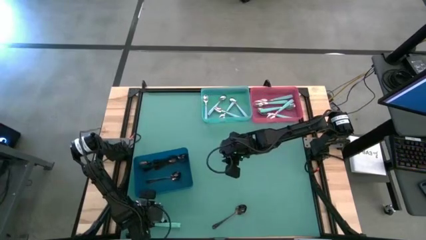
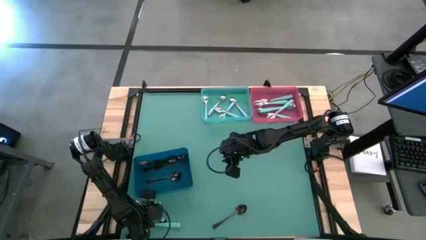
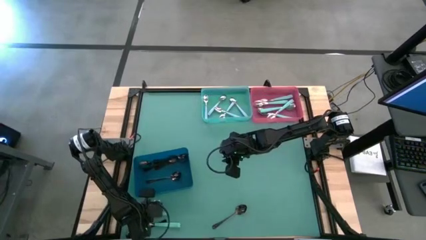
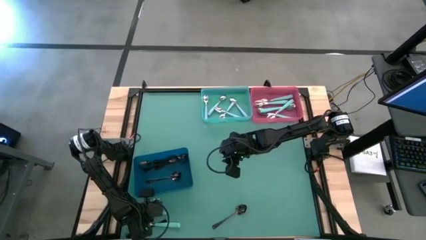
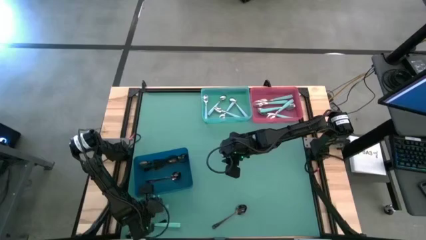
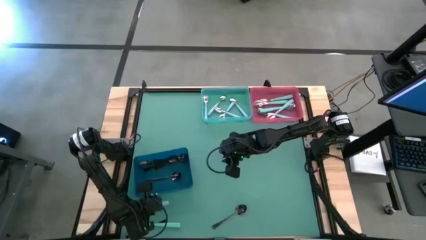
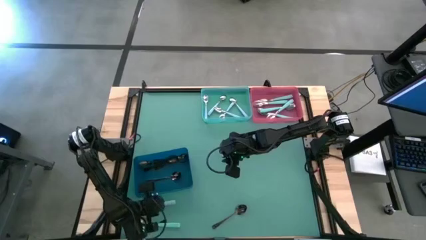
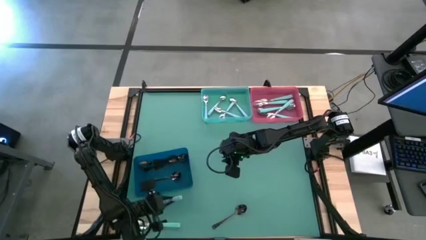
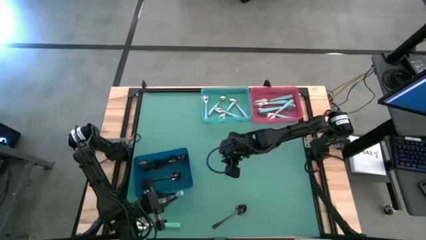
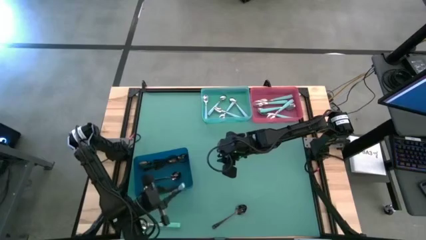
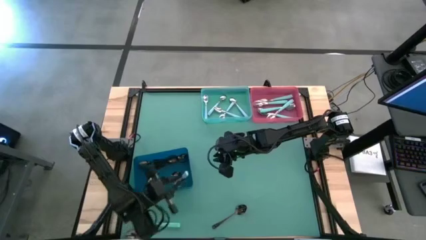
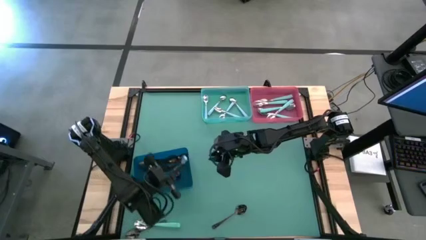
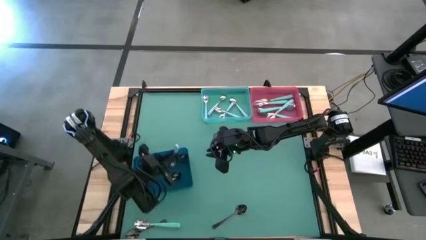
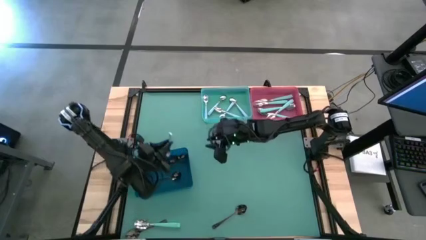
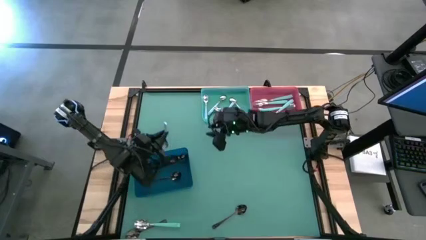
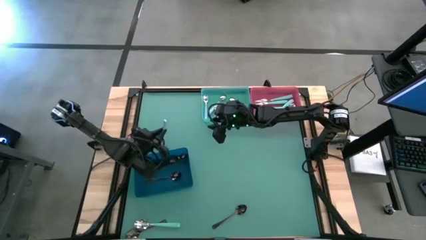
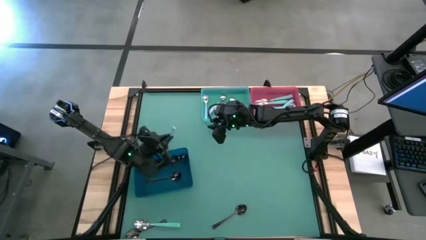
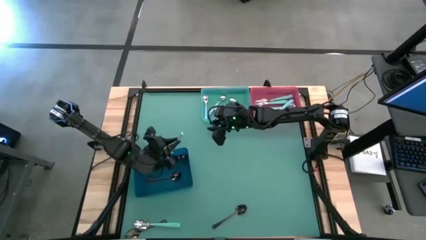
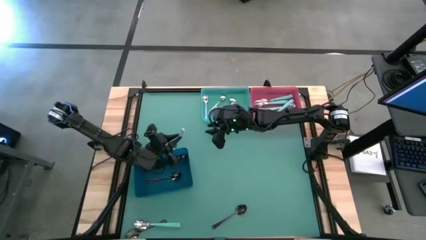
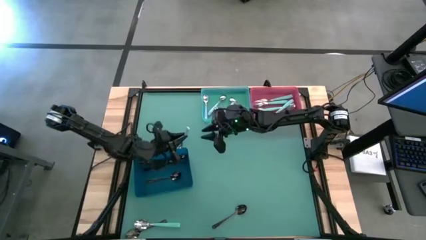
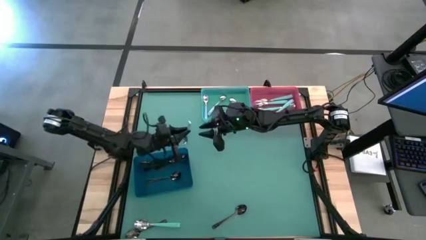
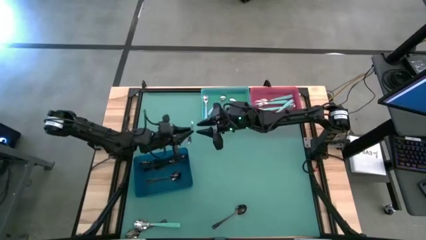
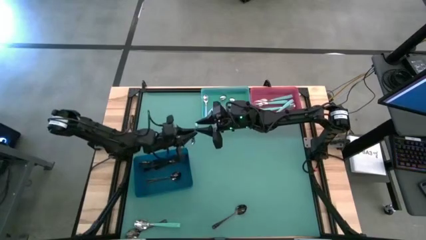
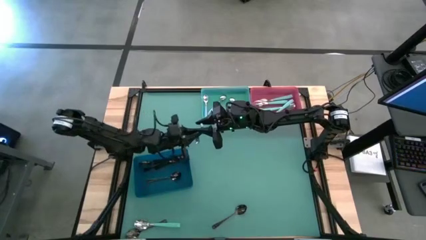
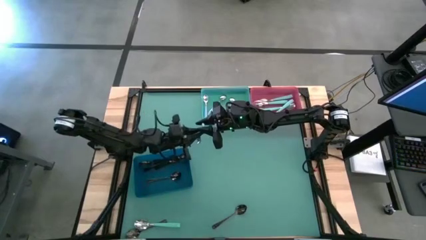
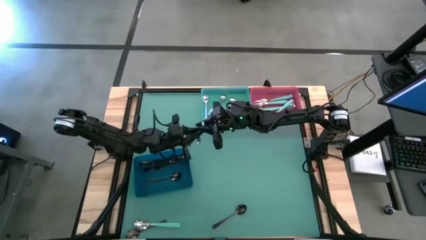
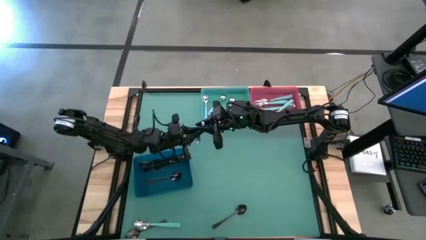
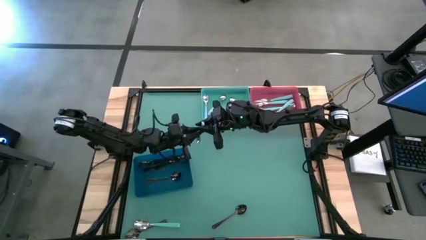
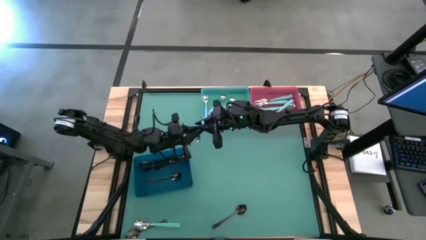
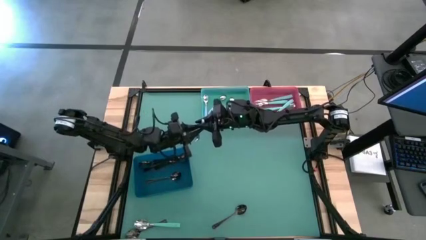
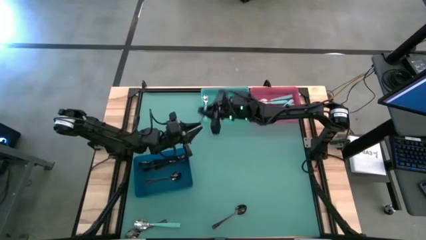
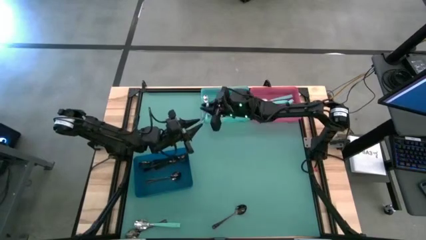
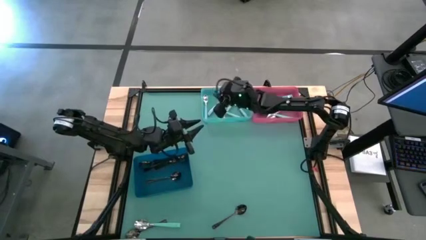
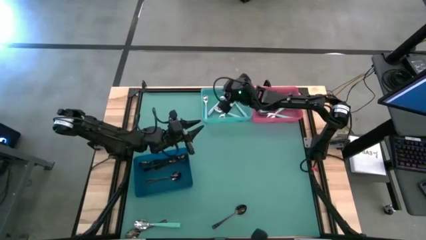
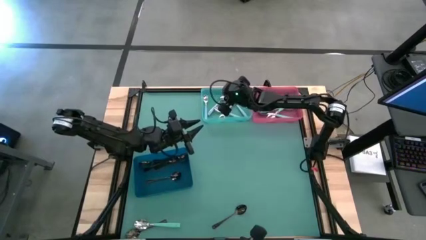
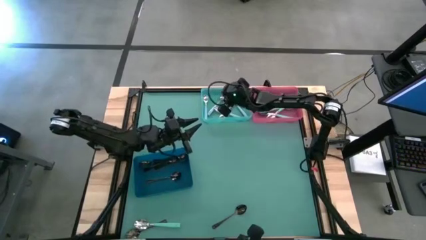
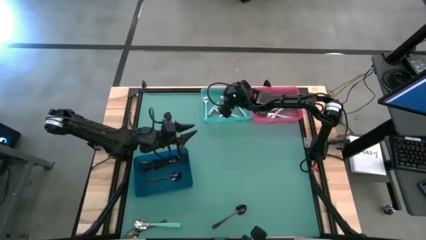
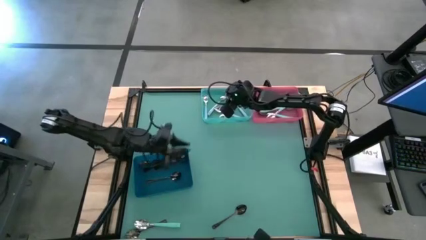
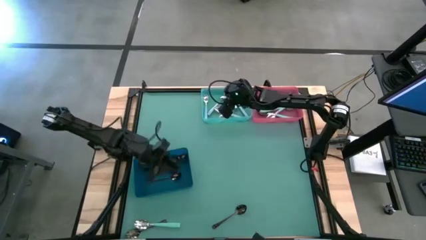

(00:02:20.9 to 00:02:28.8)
Task: Sort silverware by color (type)
Put the light blue spoon into the teal bin

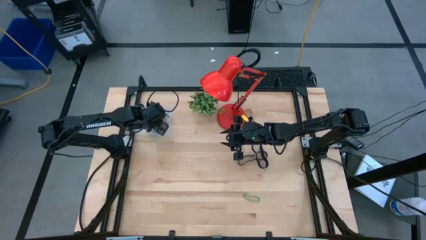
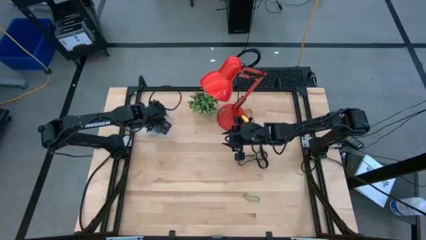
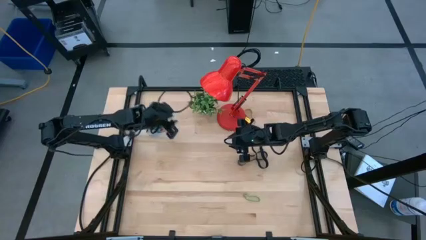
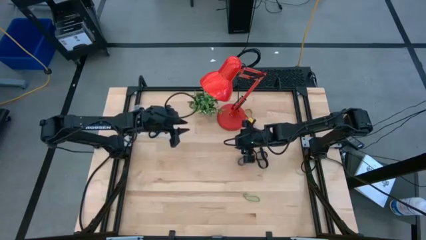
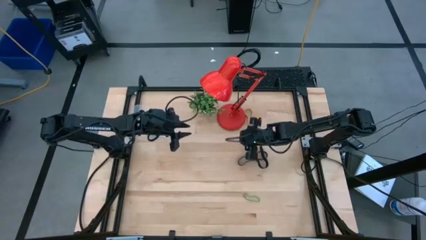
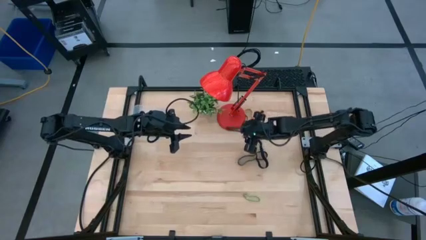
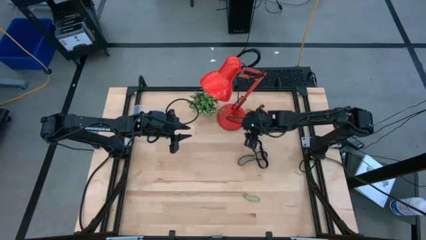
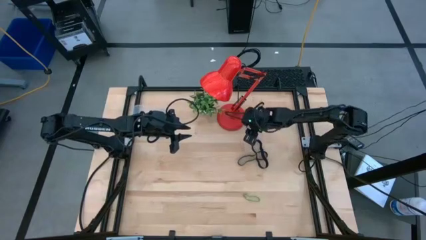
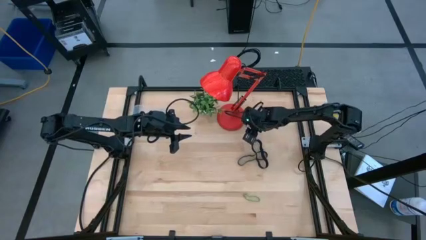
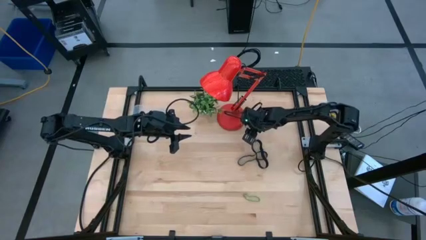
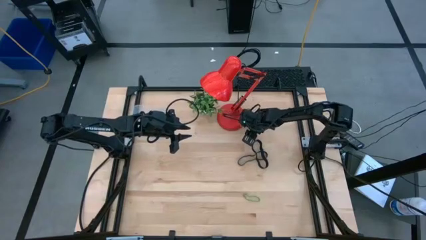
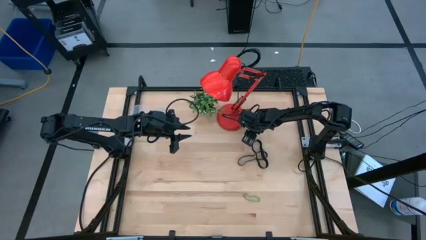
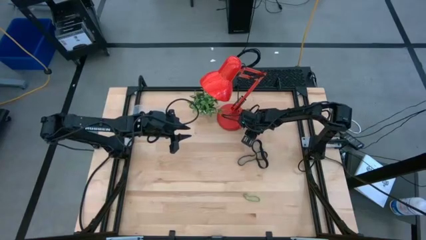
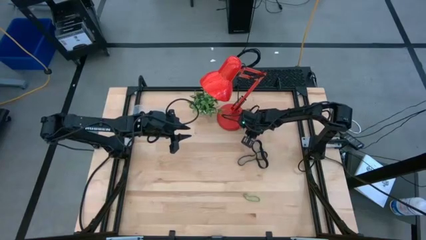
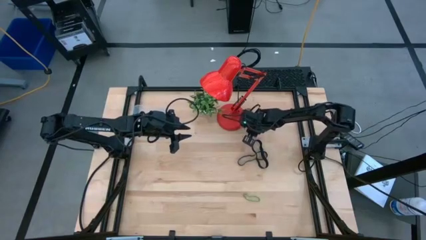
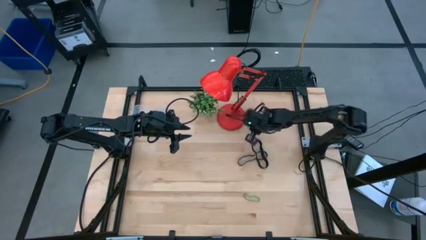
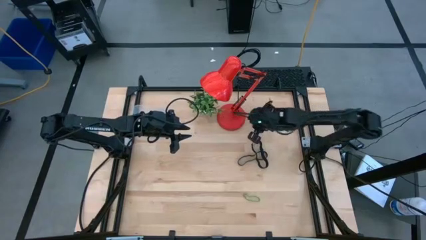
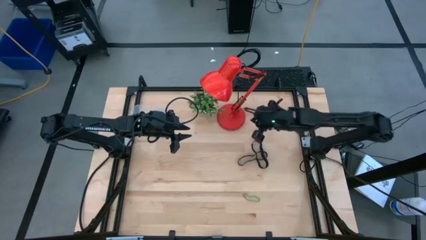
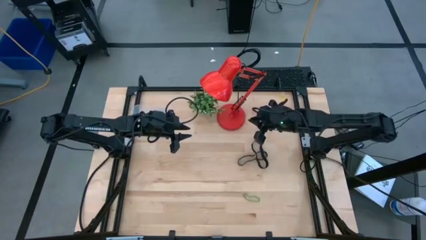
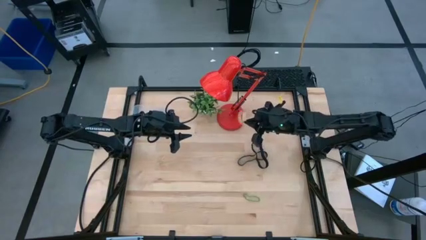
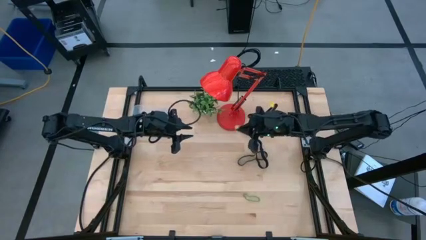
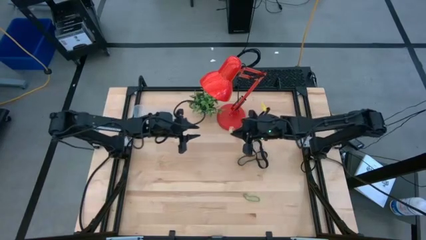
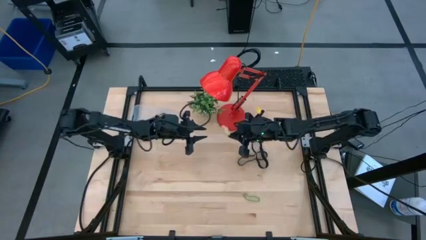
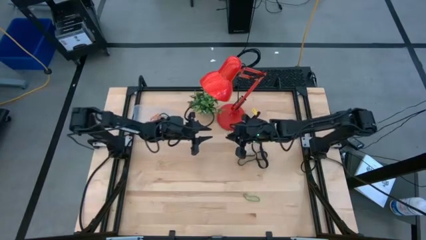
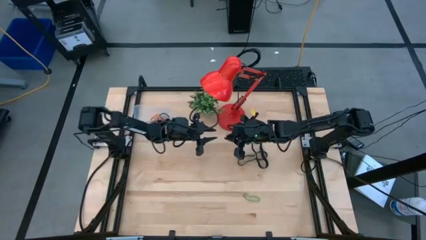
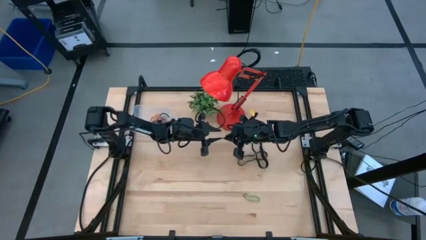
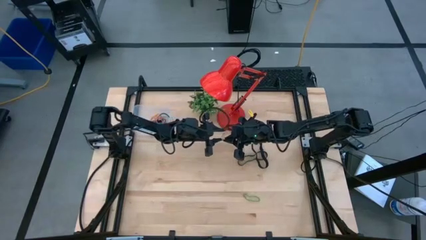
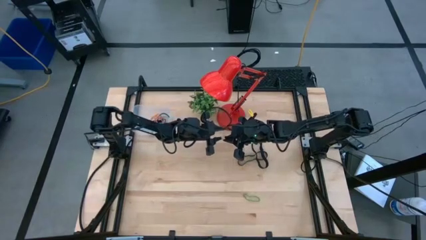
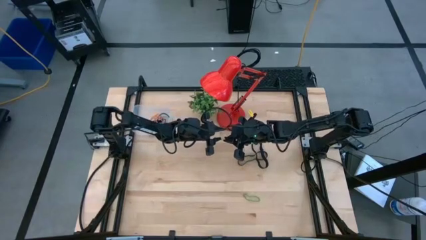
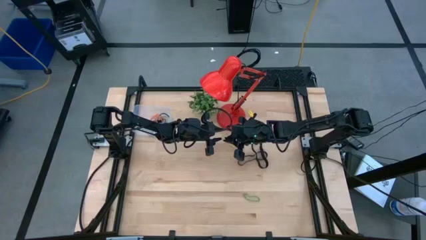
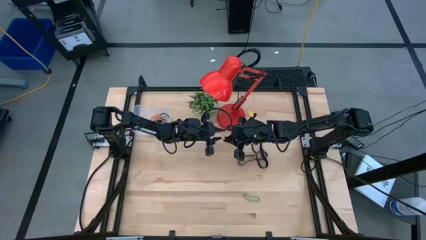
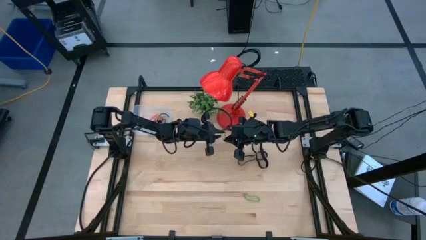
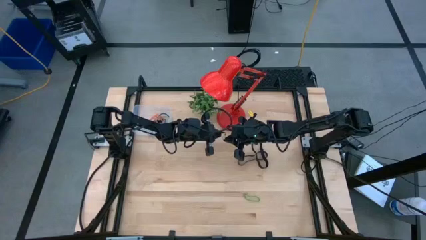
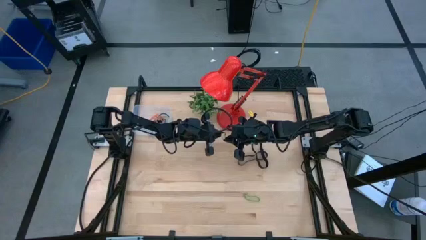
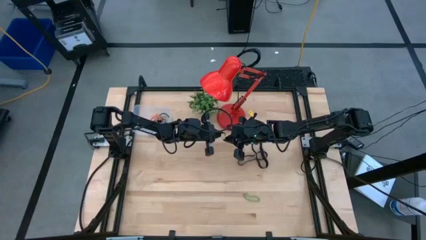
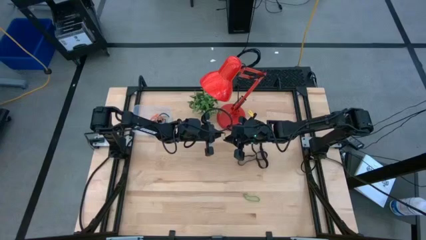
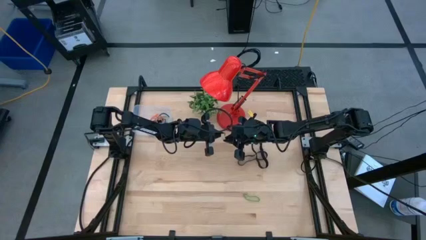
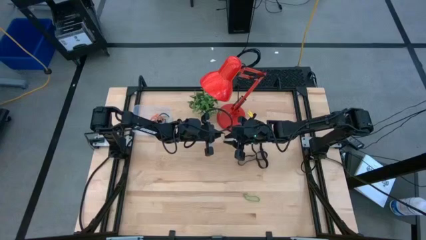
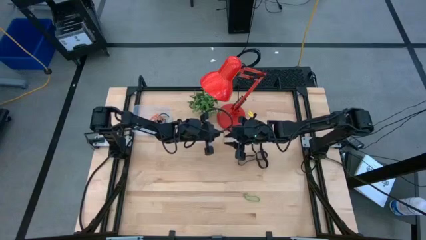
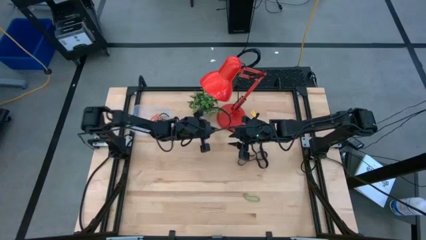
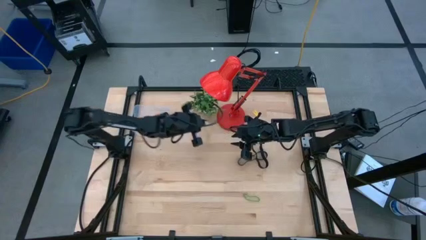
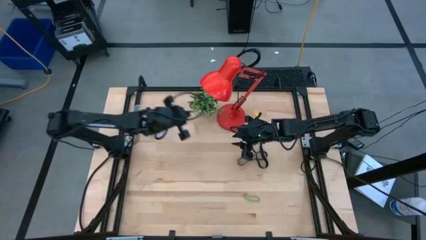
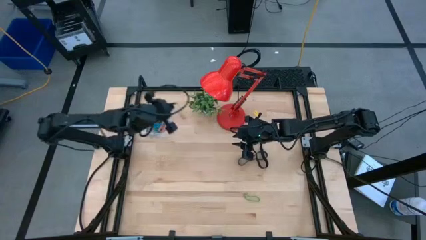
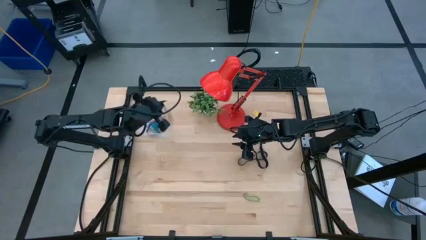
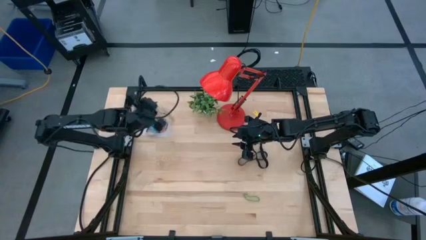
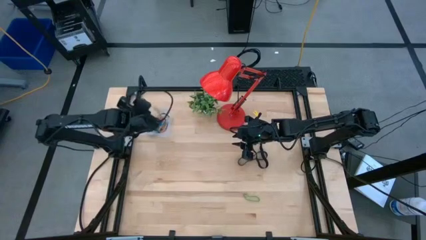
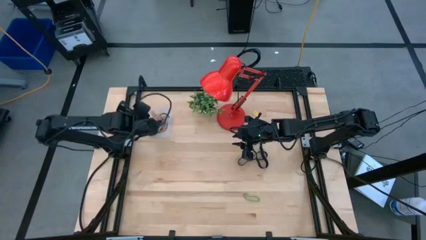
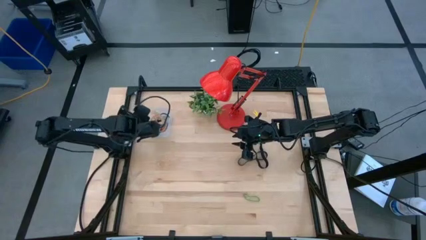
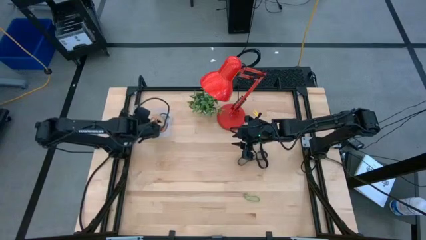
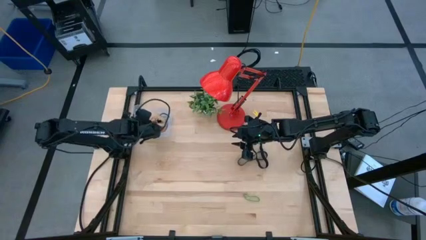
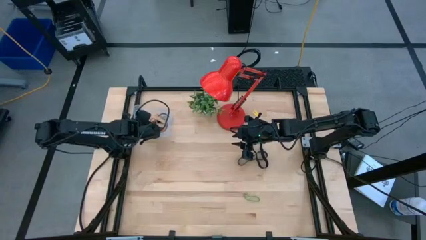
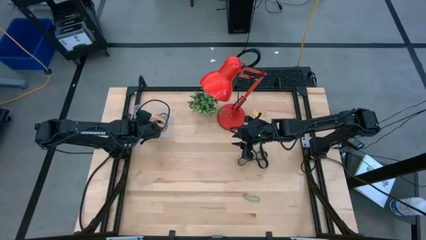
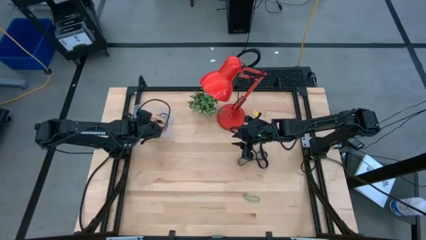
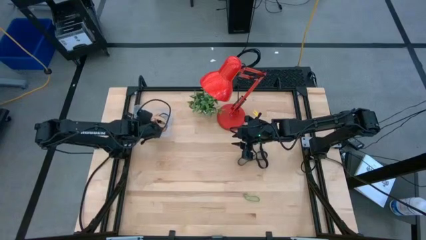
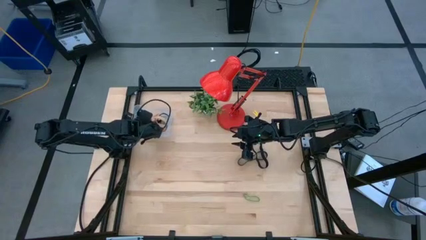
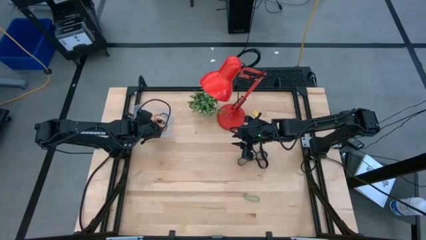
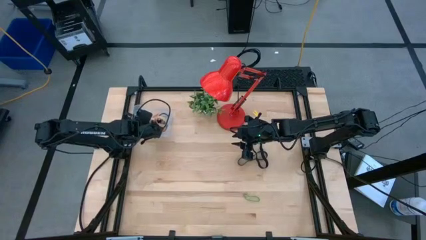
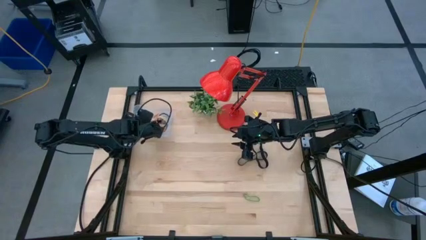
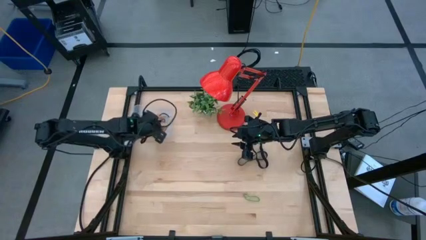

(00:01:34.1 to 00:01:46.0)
Task: Pick and place rubber bands into bin
Put the brown rubber band into the transparent bin
